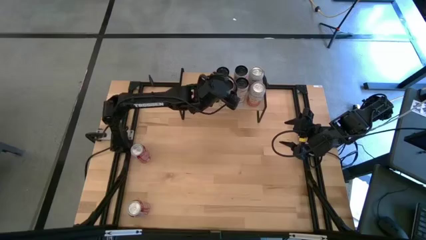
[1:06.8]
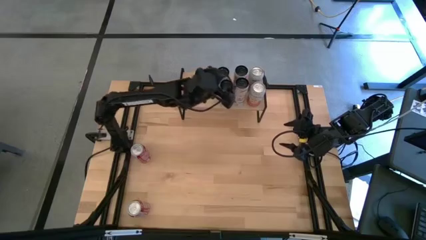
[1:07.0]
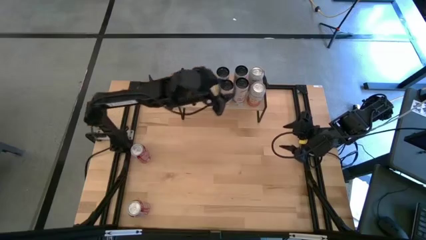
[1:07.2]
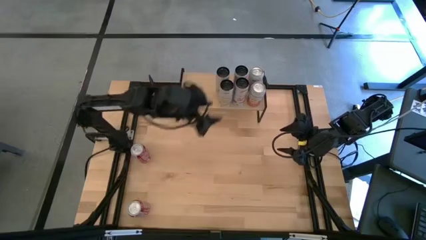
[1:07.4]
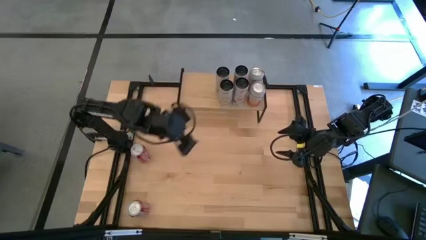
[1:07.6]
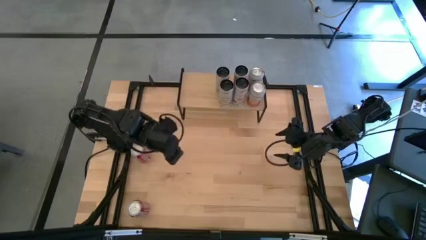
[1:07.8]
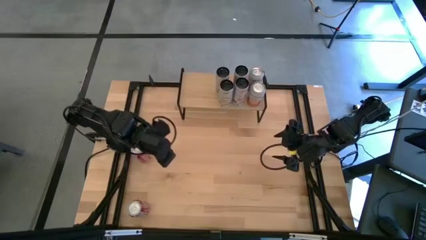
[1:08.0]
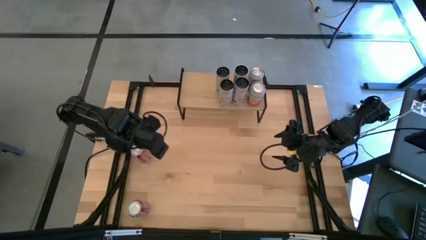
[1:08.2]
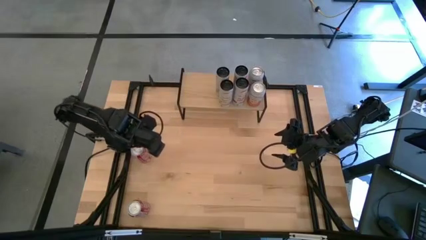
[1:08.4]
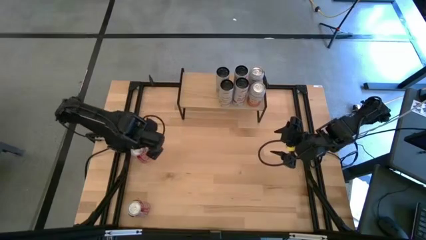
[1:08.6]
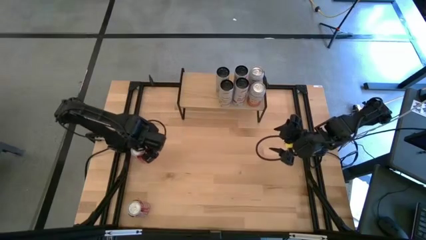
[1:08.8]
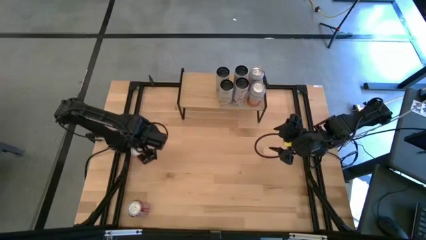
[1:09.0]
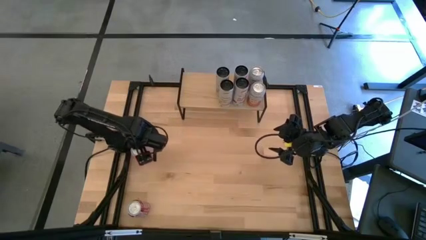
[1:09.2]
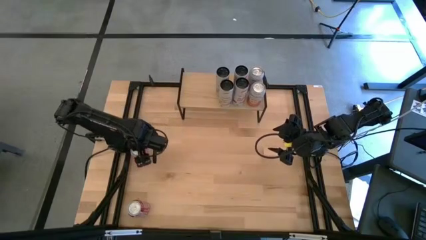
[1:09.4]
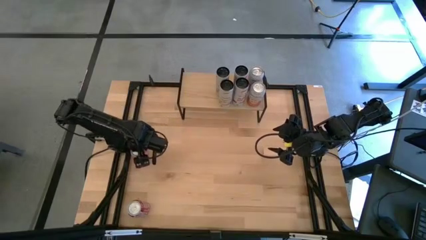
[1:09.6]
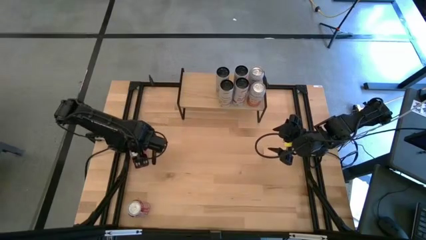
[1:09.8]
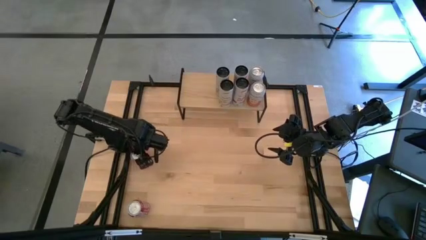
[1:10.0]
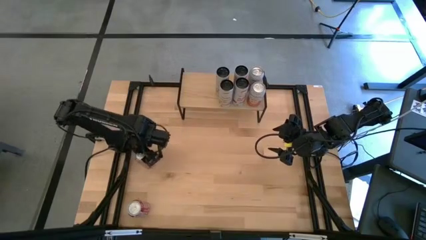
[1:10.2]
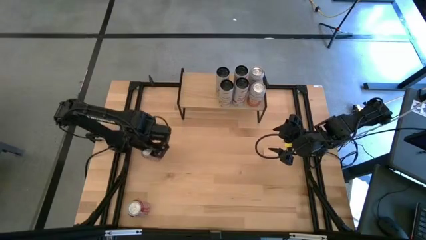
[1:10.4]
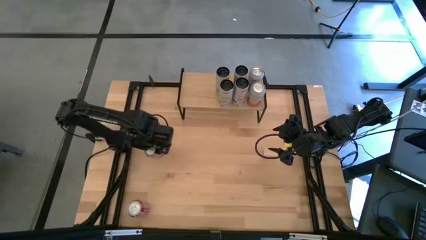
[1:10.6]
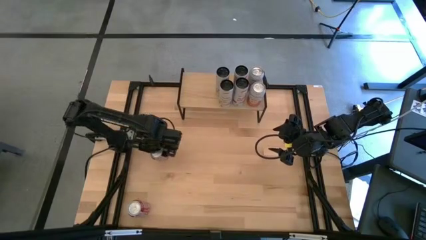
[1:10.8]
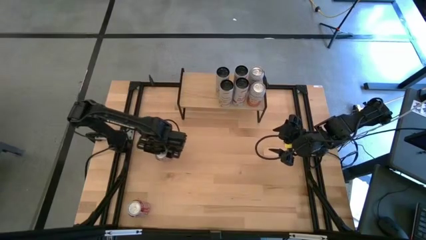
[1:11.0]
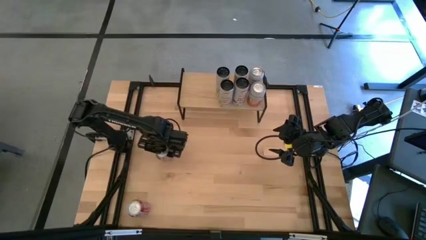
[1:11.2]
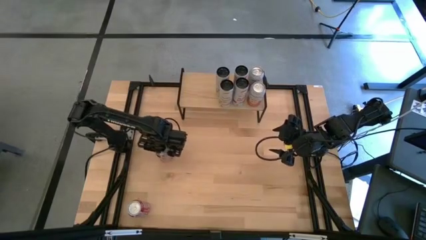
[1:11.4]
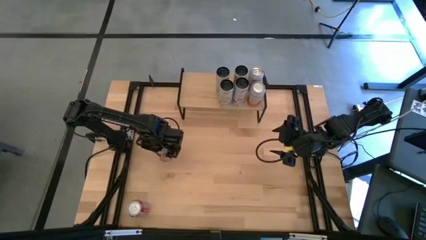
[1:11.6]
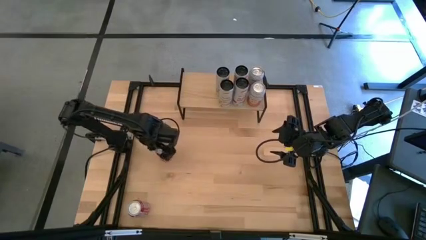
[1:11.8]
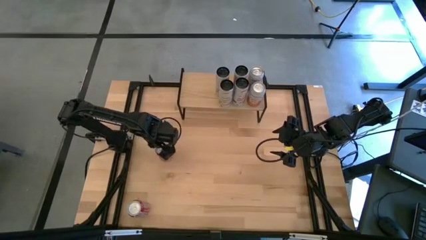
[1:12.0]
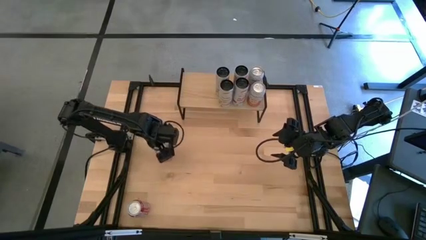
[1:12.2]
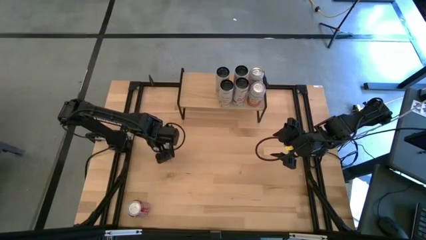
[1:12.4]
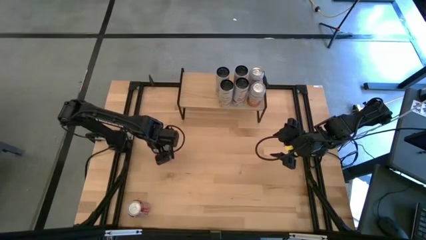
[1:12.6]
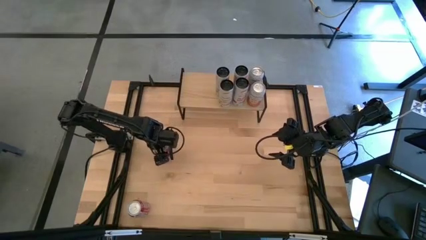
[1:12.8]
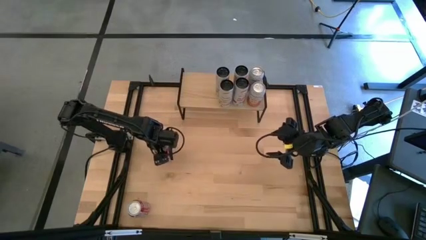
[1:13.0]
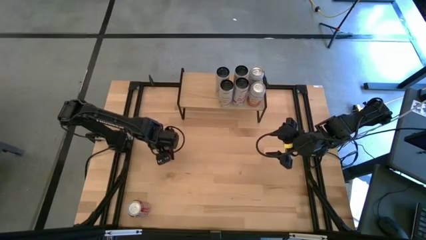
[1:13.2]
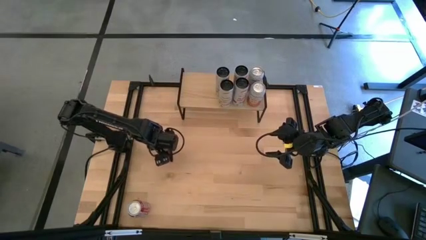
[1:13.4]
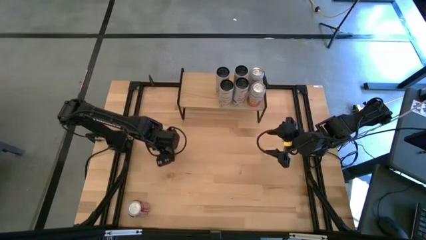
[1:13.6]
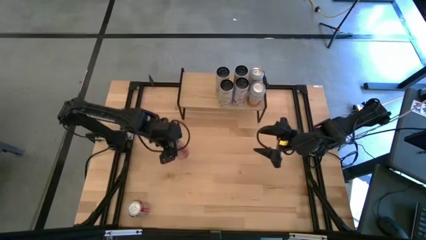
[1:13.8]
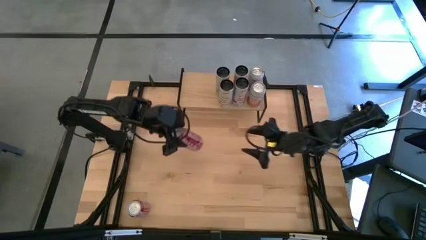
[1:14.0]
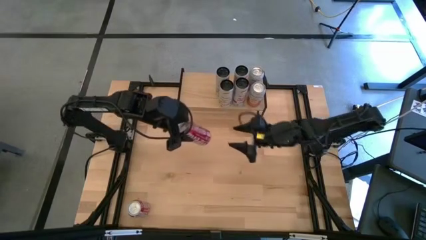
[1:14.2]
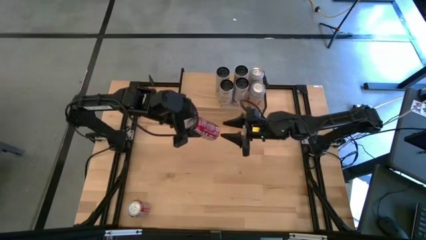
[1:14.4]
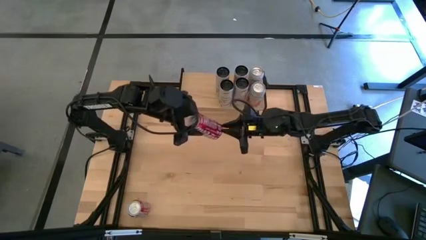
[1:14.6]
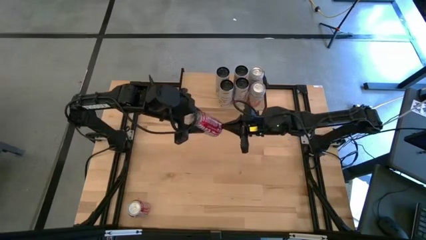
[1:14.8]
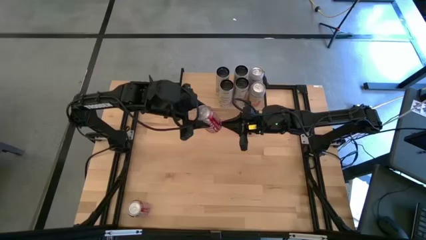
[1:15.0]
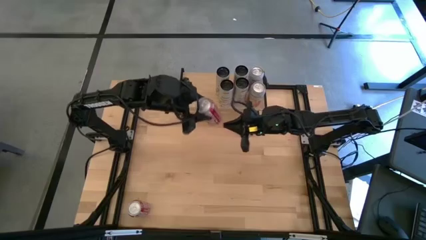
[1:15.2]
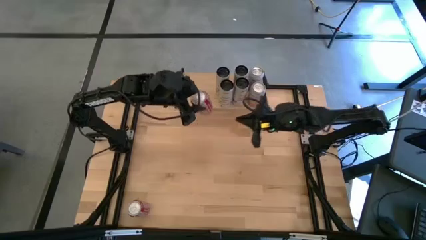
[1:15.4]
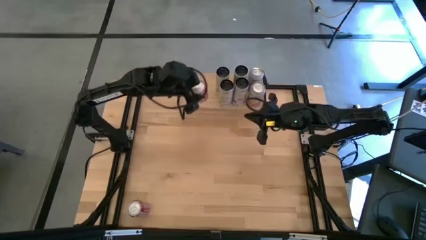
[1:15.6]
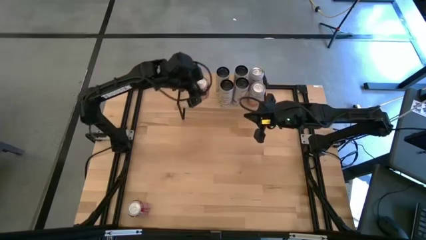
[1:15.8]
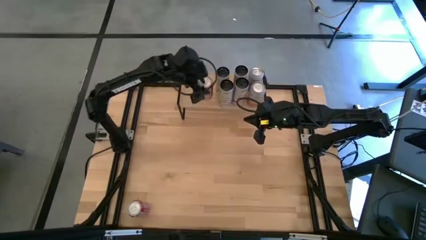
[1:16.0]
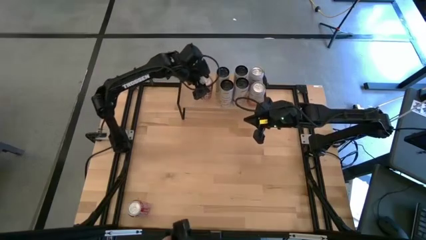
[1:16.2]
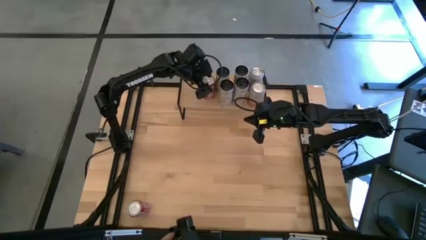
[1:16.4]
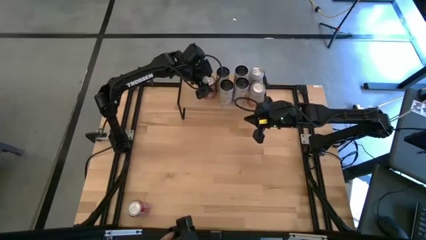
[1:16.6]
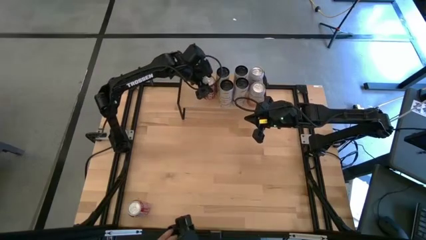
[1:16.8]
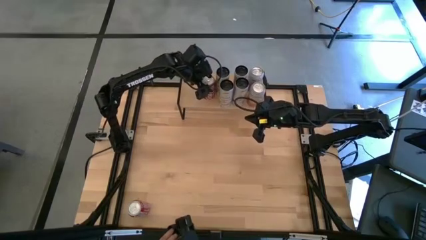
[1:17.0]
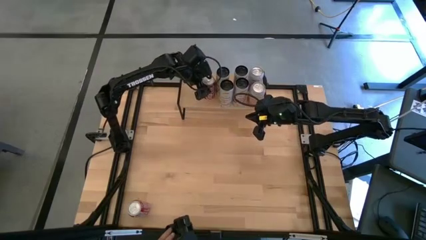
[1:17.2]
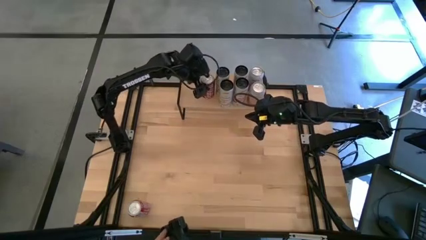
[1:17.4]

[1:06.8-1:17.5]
Task: Place canned beverage on shelf
Put the top red white soda can on the shelf

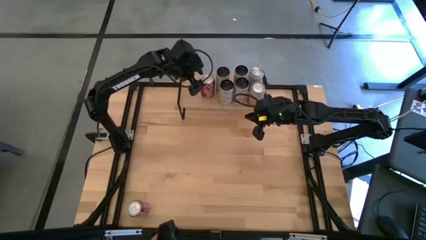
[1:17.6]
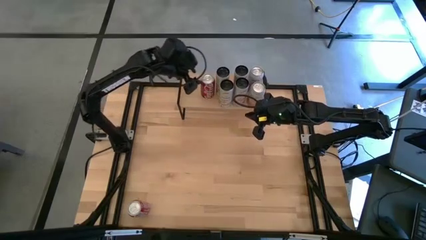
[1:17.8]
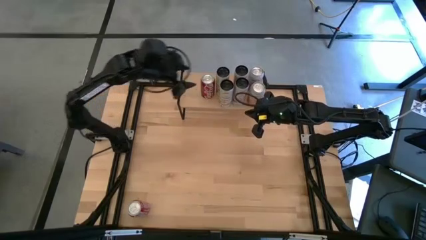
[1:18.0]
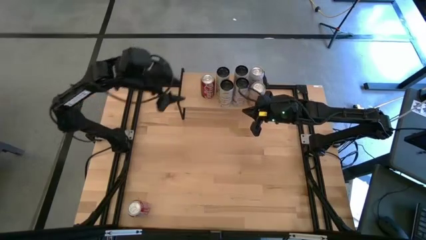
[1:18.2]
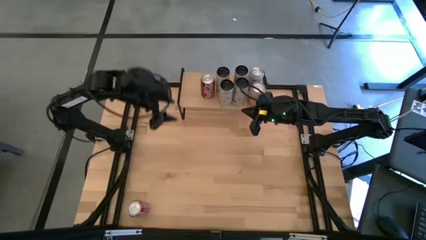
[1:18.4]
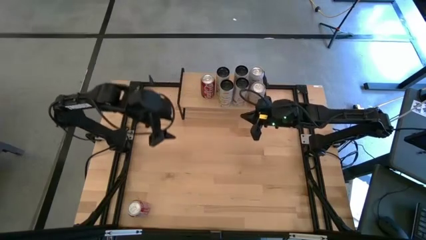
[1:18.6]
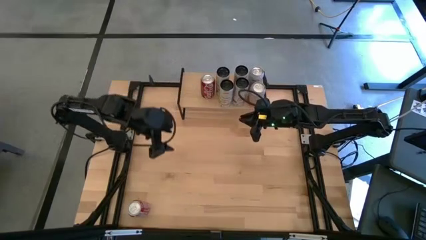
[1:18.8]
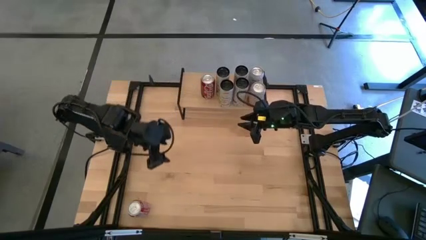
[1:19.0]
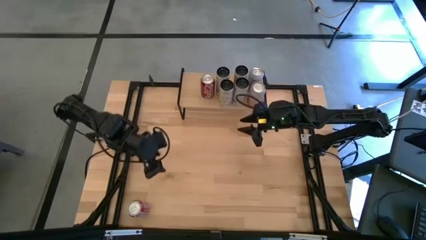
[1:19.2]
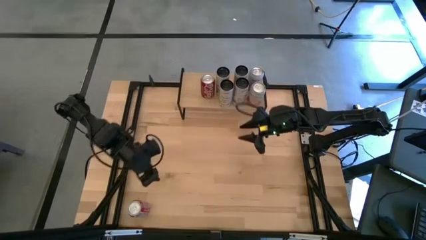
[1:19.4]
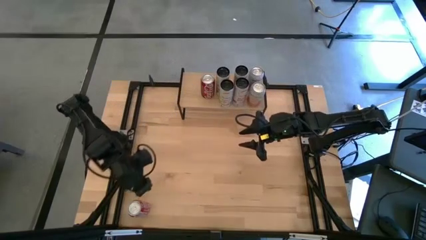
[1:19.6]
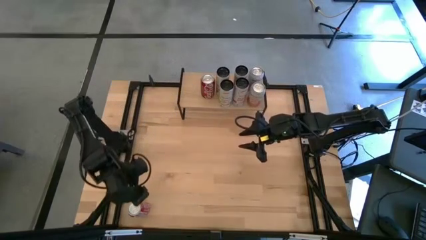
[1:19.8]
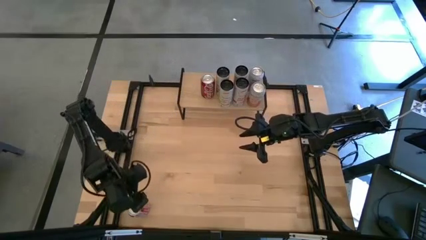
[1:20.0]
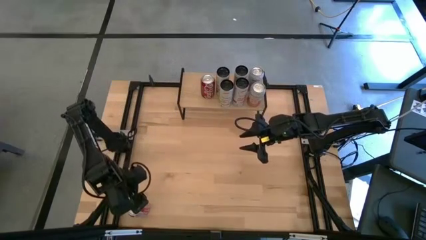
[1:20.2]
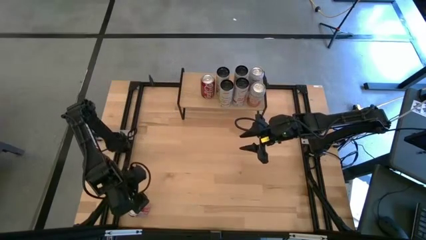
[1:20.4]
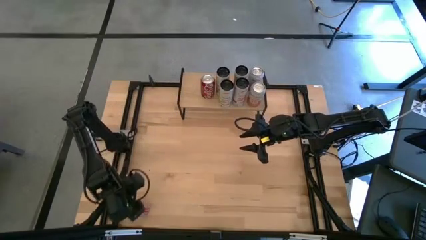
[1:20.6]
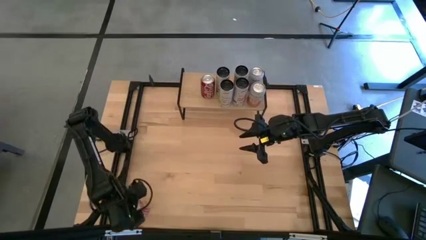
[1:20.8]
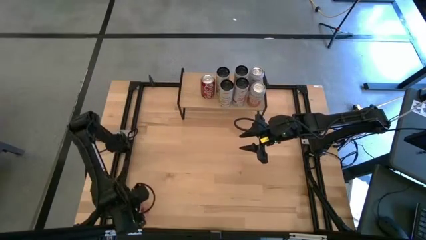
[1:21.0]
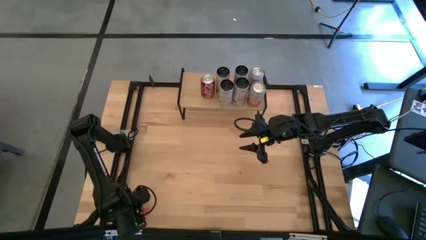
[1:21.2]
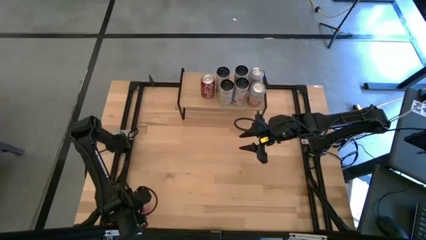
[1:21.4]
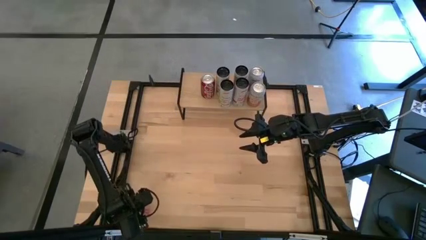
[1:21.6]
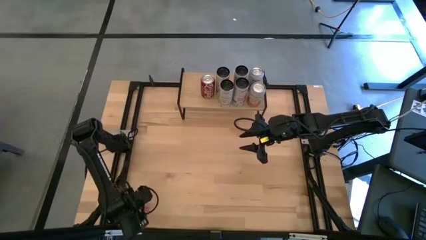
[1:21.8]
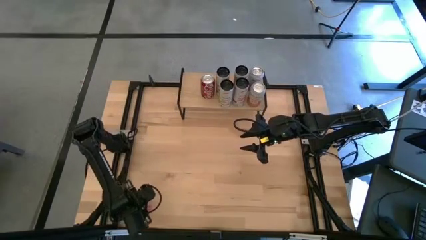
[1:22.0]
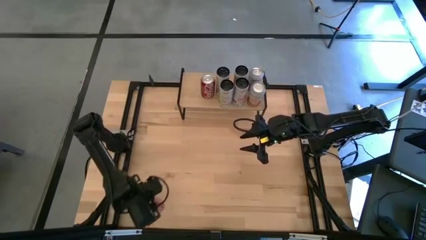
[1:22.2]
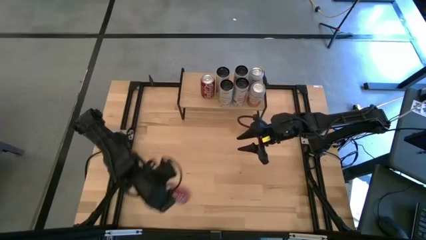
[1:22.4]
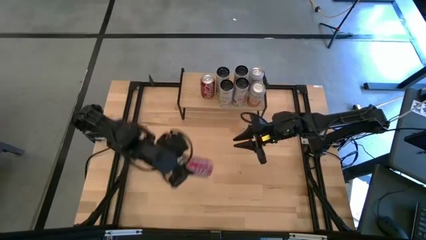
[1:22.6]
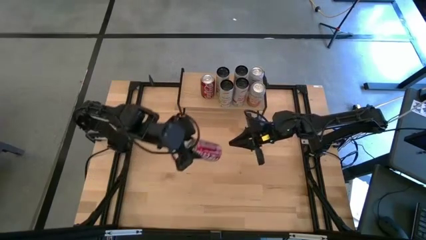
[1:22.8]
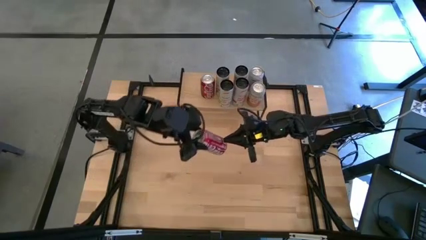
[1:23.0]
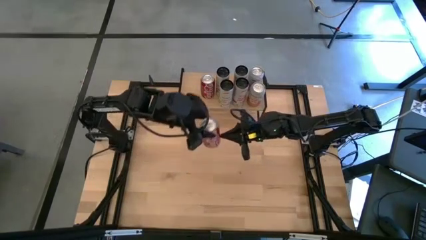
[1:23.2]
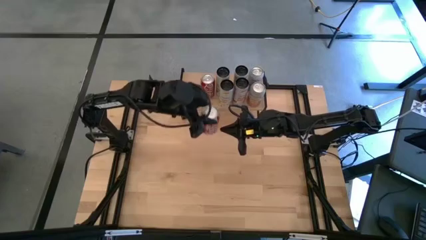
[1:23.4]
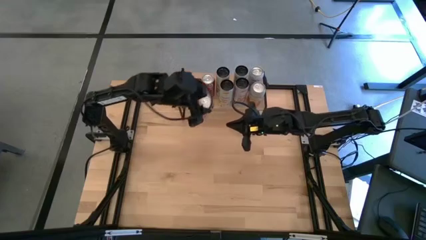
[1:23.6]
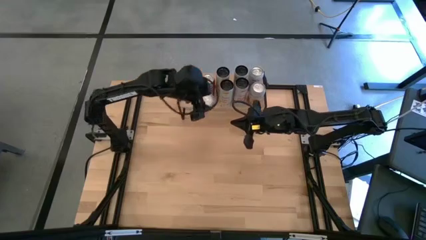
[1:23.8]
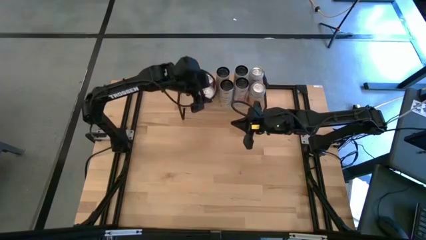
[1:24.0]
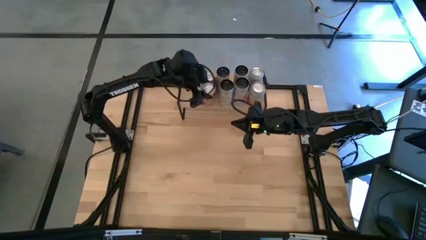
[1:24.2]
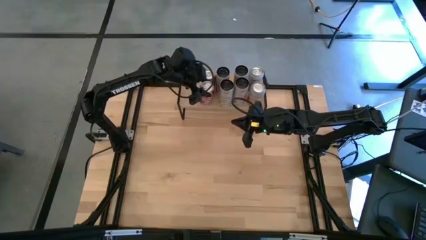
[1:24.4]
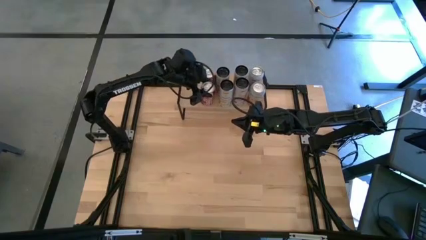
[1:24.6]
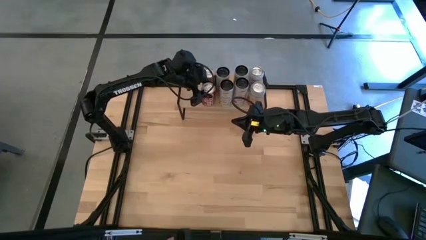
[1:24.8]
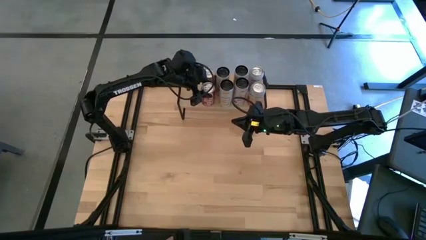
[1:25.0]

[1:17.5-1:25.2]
Put the red white soda can aligned with the other red white soda can on the shelf
